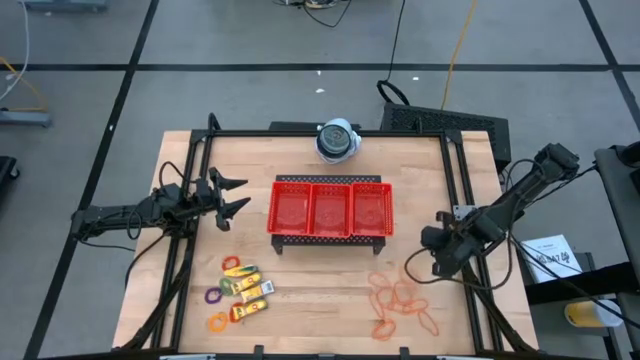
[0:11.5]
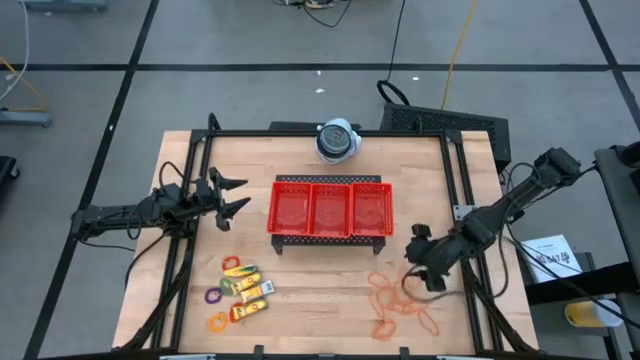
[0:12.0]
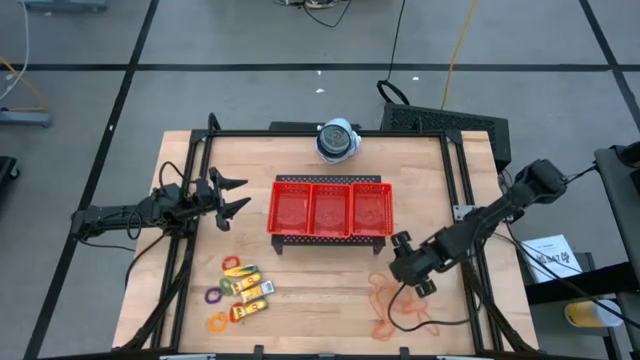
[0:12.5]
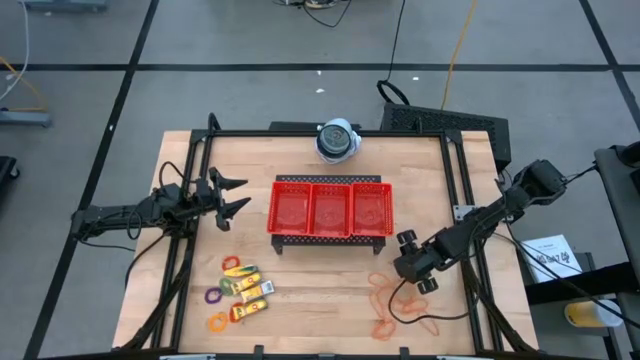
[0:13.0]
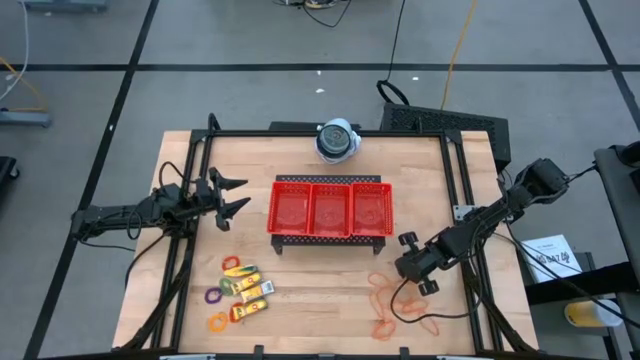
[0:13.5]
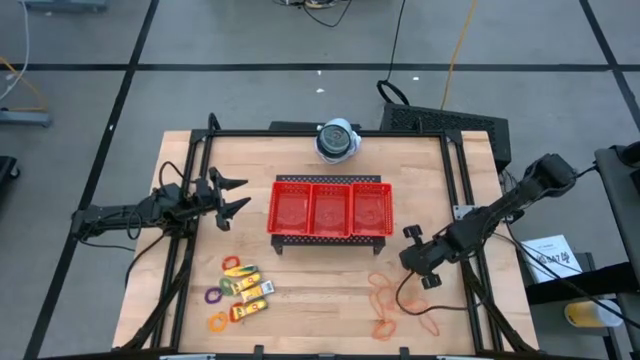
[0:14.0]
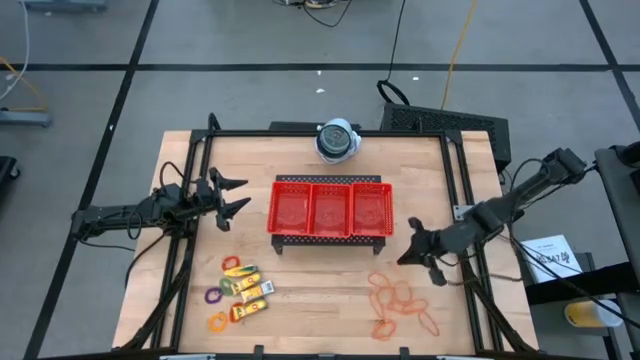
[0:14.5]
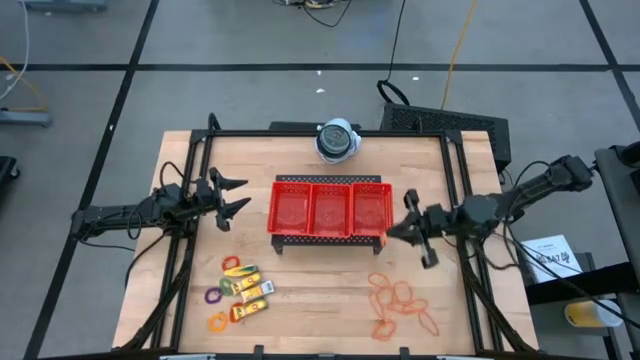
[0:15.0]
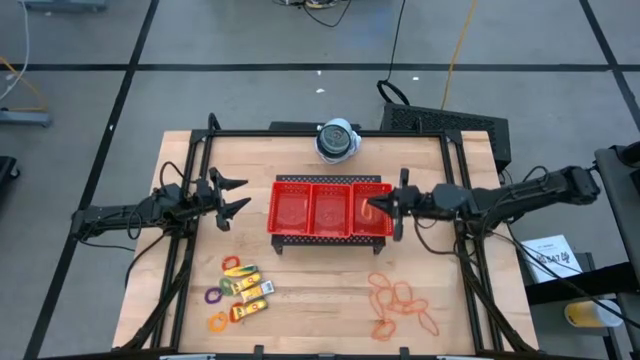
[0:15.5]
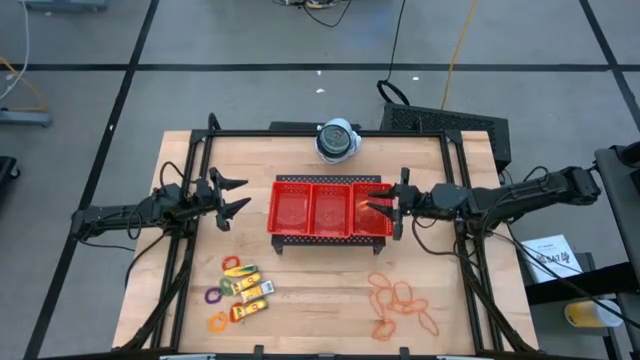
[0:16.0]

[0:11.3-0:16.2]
Task: Pick & Place Office Desk Supplies
Put the orange rubber band into the right red bin

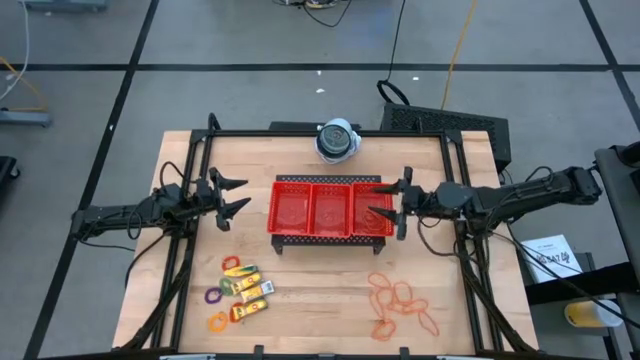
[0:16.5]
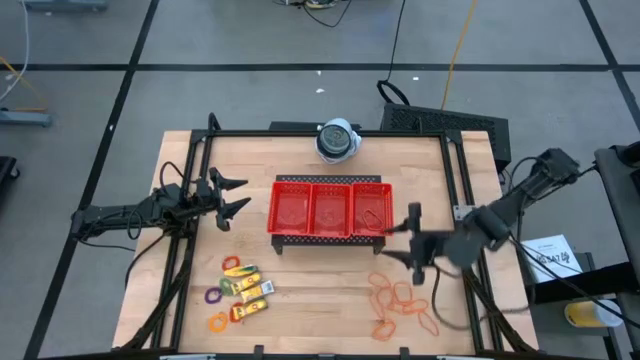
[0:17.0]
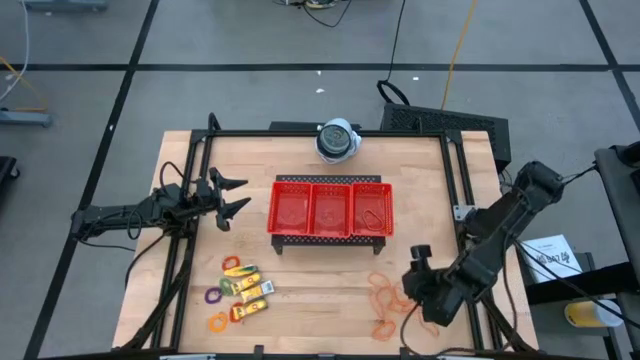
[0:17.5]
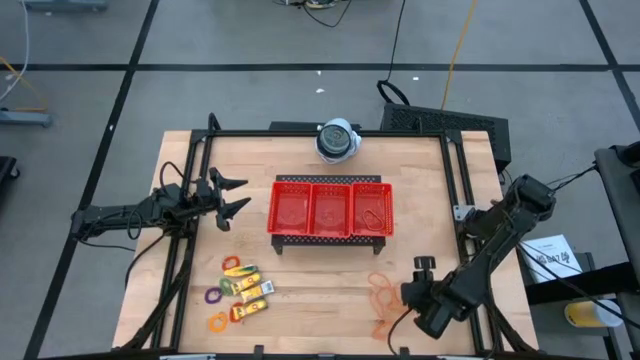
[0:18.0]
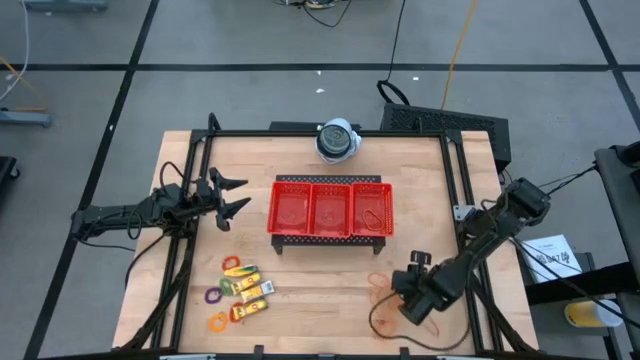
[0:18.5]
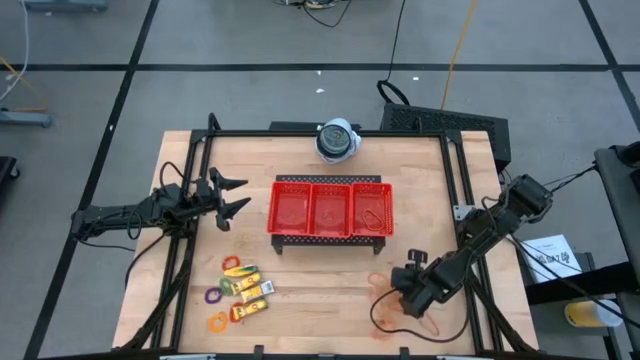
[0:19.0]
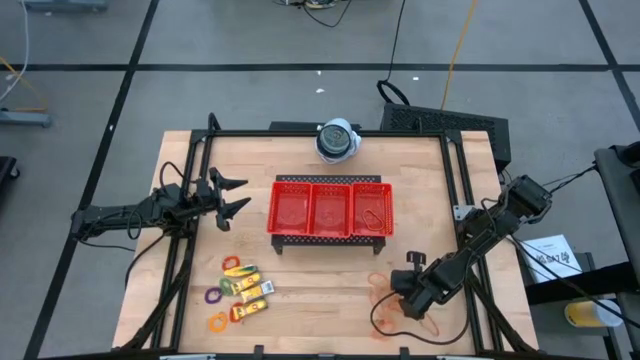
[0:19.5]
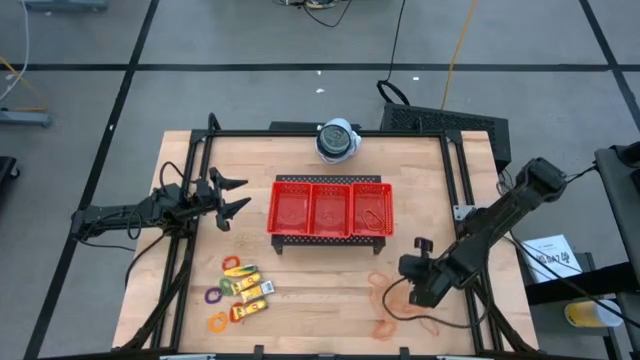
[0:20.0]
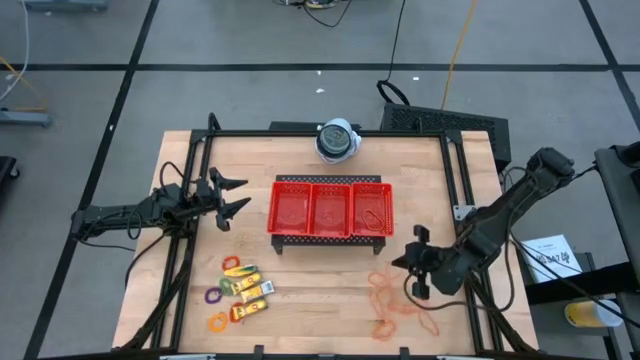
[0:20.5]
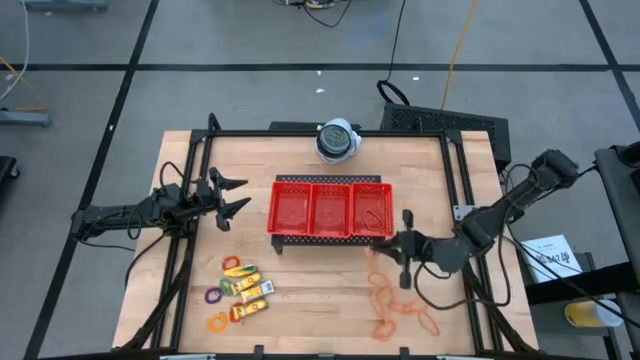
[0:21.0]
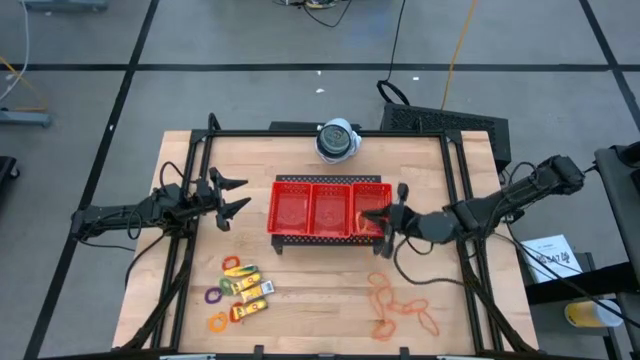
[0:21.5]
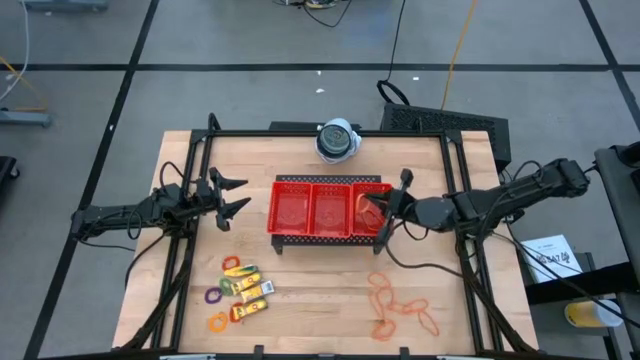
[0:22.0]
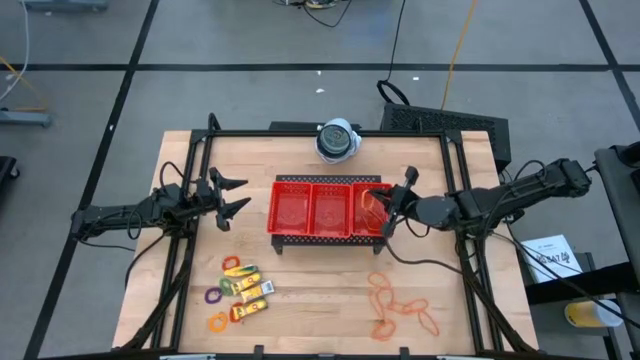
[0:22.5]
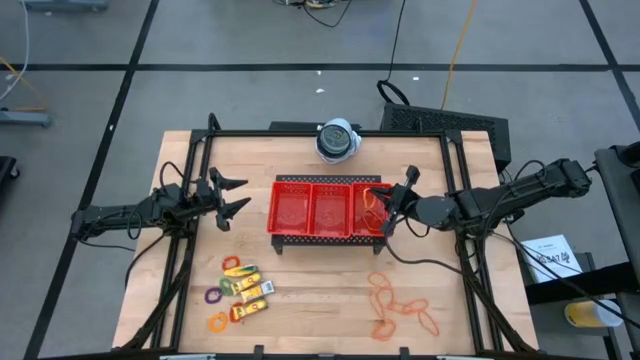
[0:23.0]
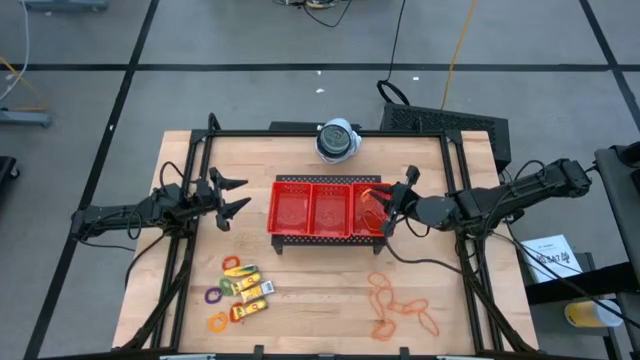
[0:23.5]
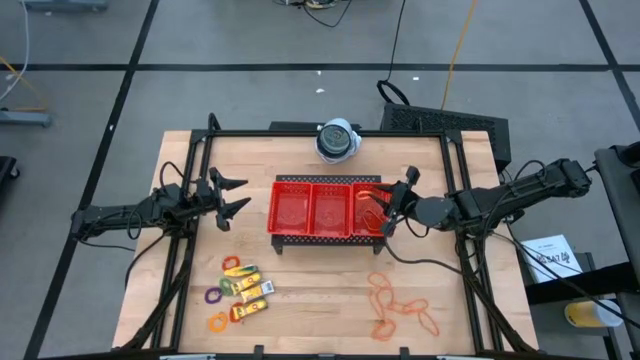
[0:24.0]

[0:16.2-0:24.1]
Put the orange rubber band into the right red bin

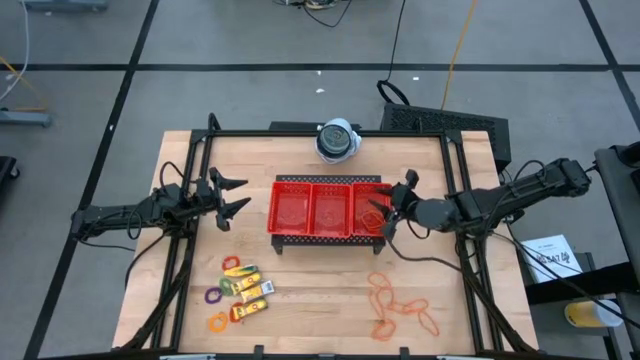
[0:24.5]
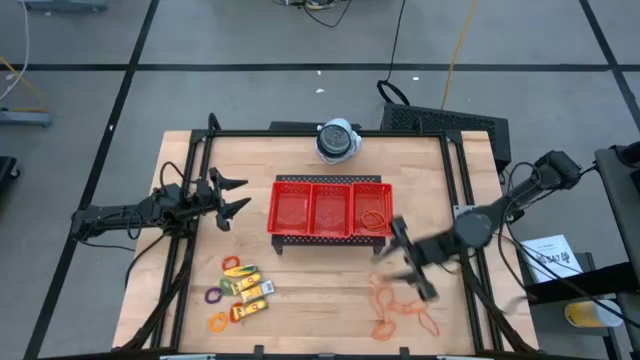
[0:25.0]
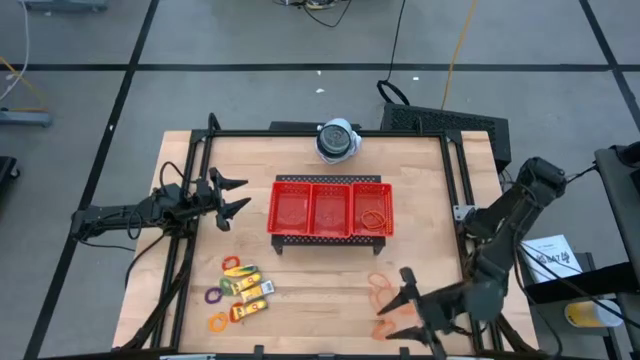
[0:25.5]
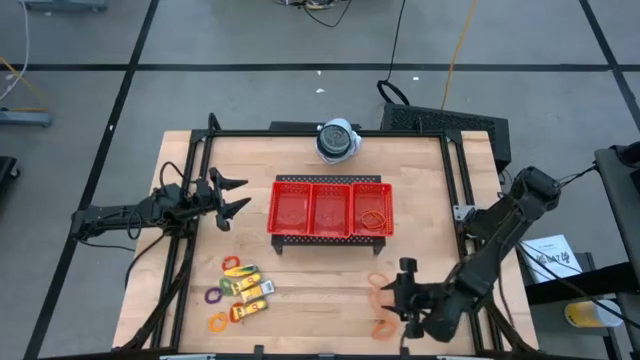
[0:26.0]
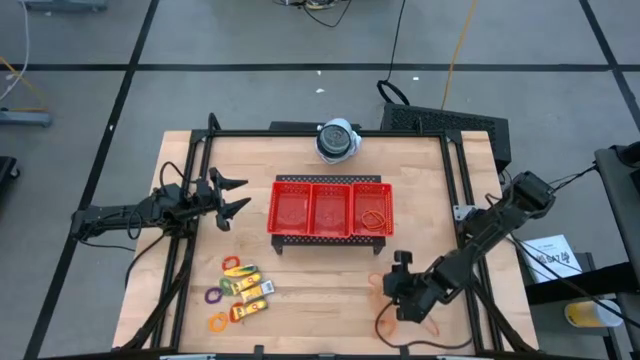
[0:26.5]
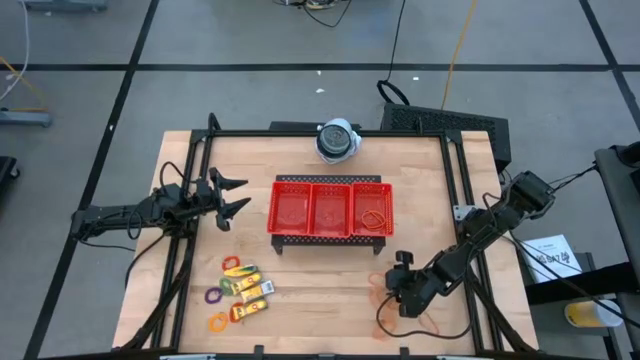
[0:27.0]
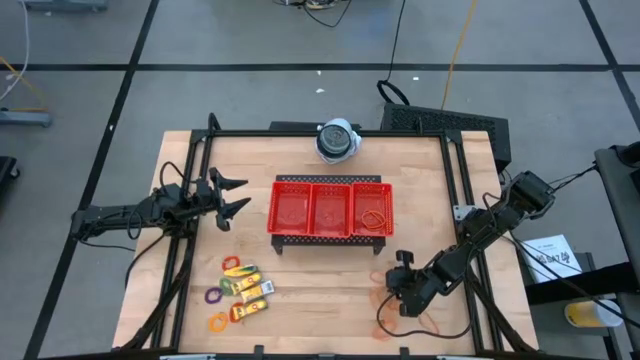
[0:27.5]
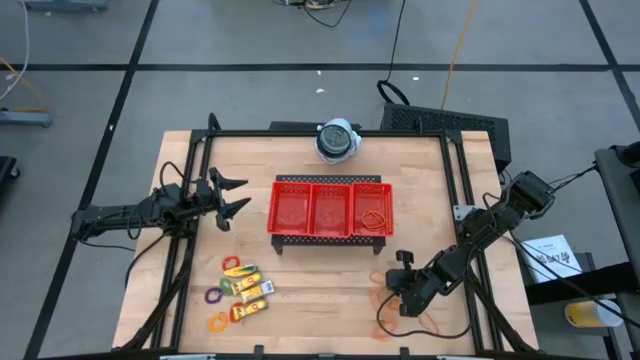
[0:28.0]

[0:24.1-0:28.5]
Put the orange rubber band into the right red bin

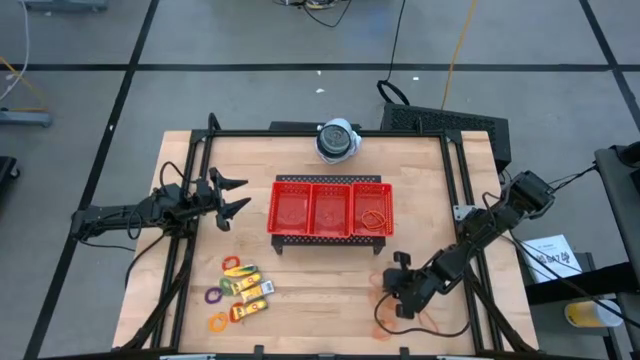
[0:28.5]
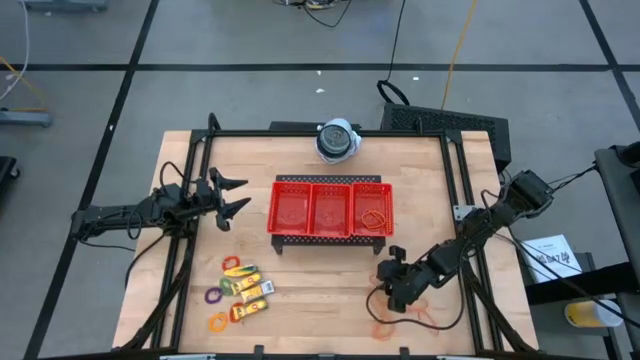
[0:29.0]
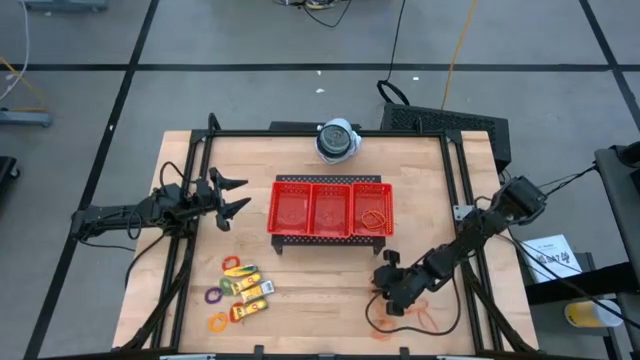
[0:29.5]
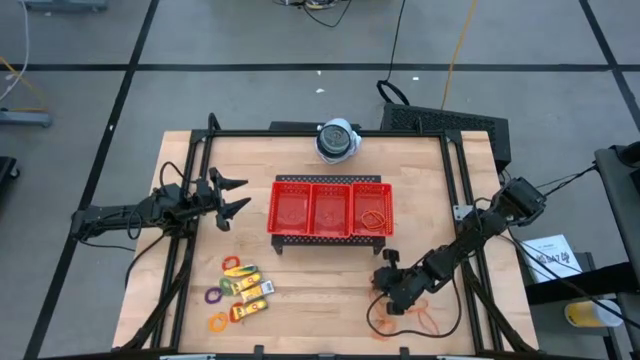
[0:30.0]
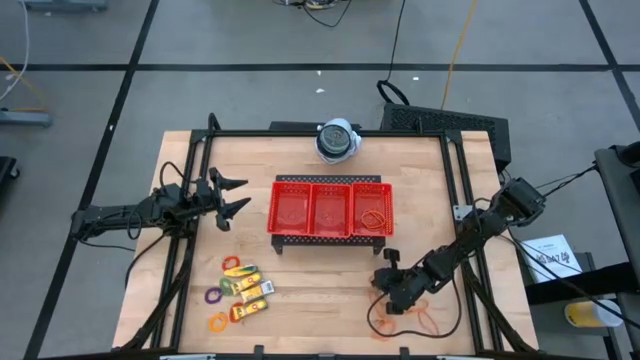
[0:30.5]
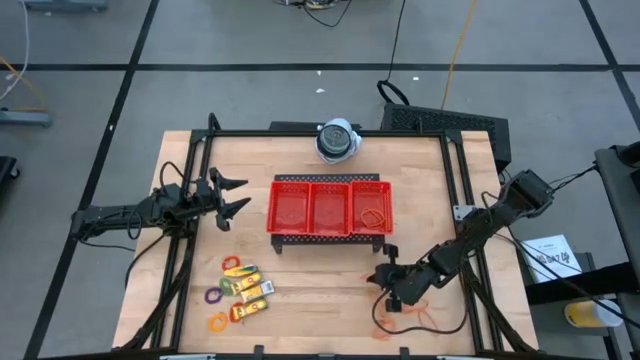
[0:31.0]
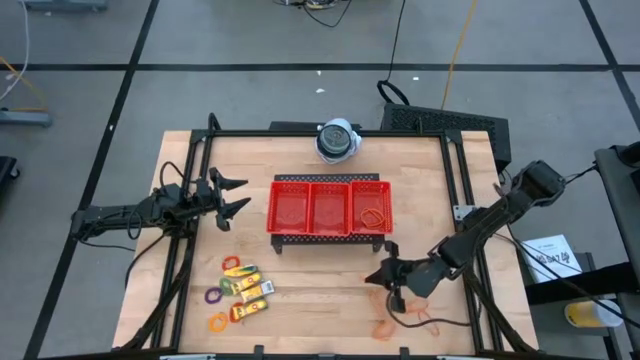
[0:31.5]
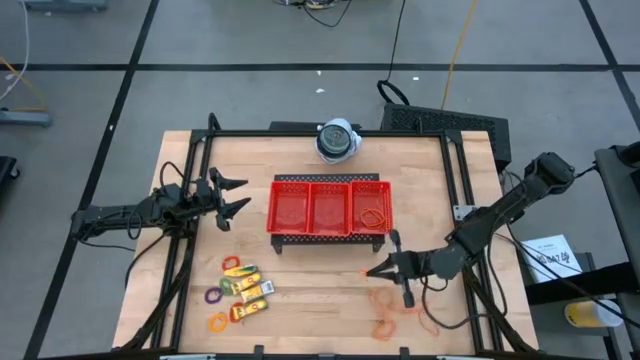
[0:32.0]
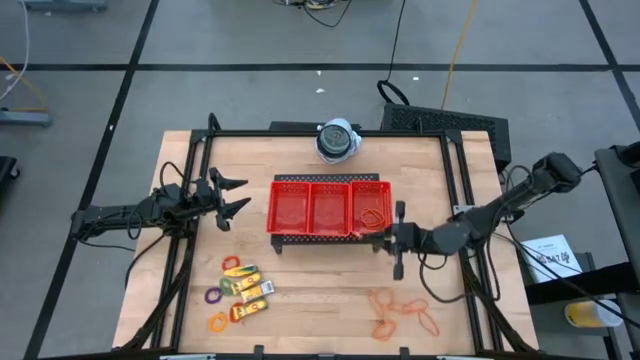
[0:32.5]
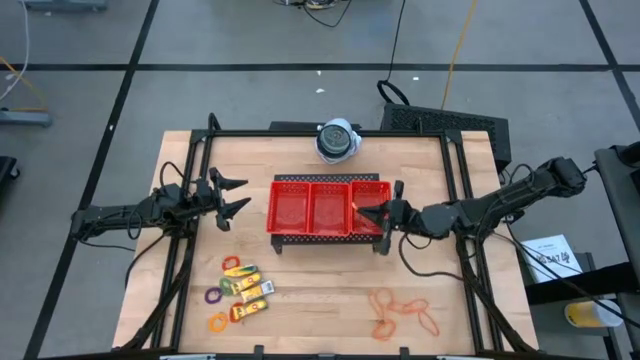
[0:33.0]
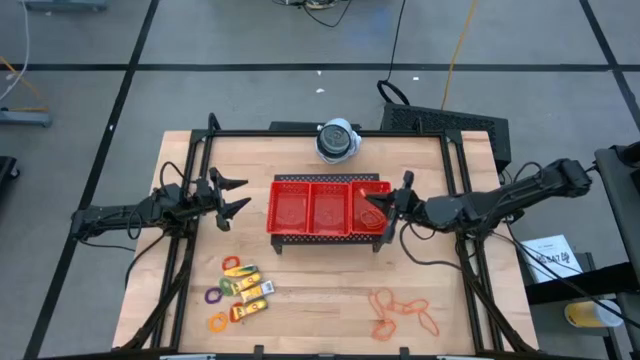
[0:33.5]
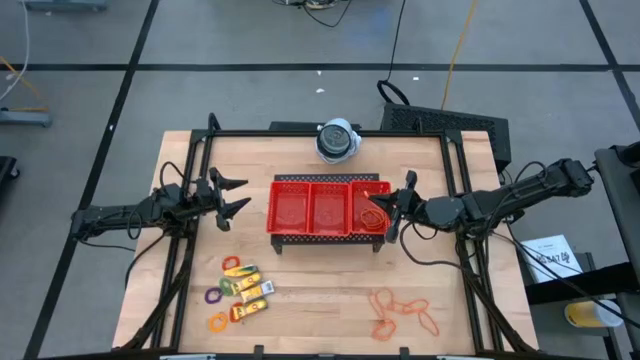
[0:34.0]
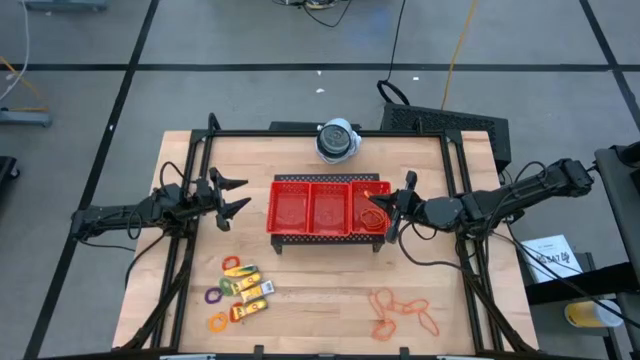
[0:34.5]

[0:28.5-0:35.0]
Put the orange rubber band into the right red bin
